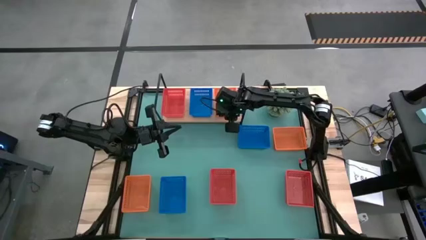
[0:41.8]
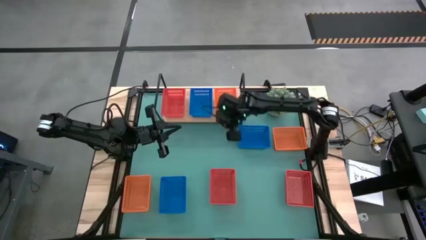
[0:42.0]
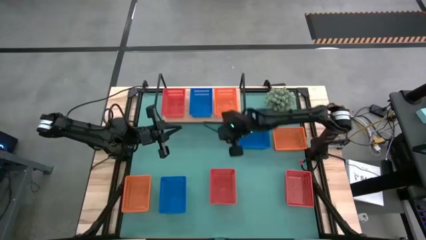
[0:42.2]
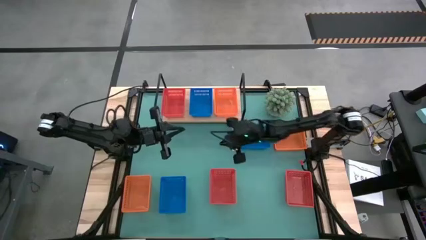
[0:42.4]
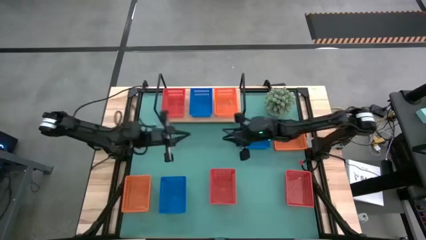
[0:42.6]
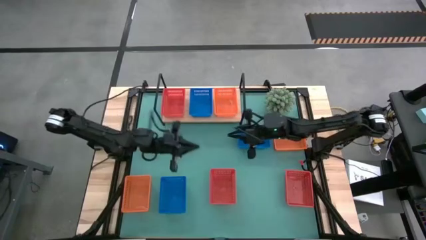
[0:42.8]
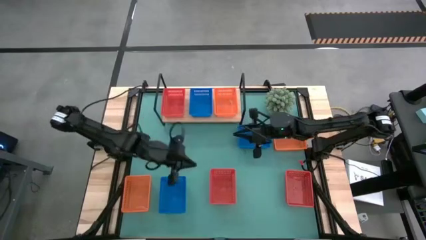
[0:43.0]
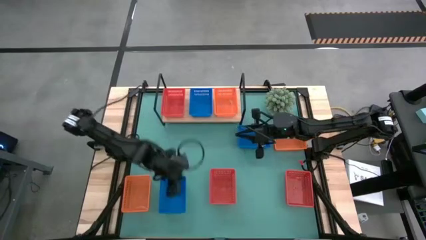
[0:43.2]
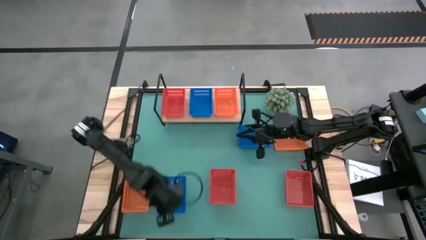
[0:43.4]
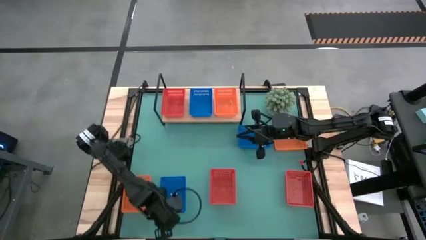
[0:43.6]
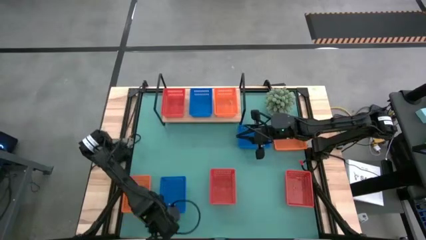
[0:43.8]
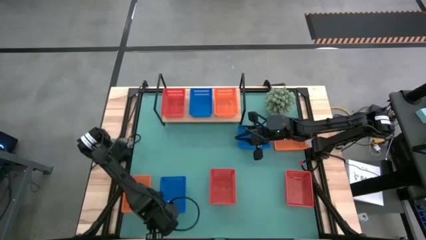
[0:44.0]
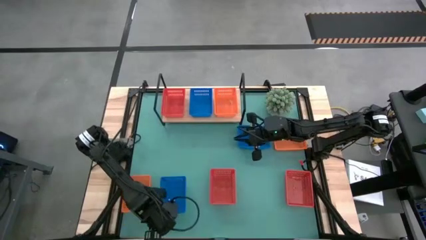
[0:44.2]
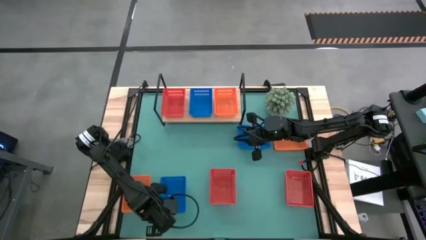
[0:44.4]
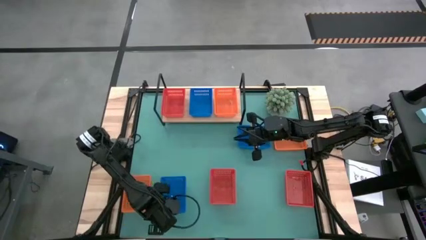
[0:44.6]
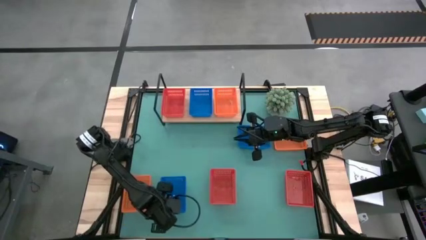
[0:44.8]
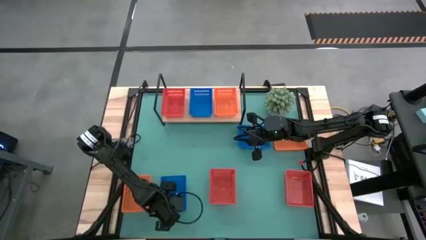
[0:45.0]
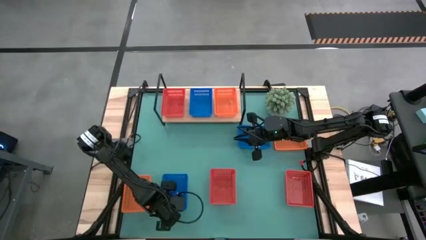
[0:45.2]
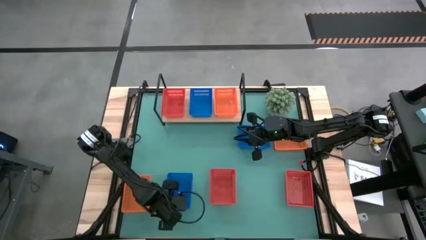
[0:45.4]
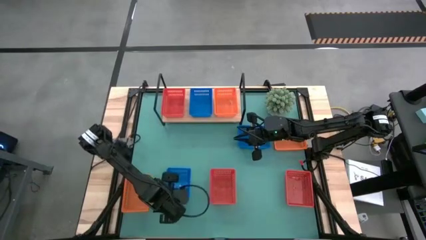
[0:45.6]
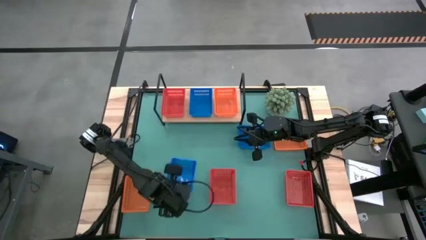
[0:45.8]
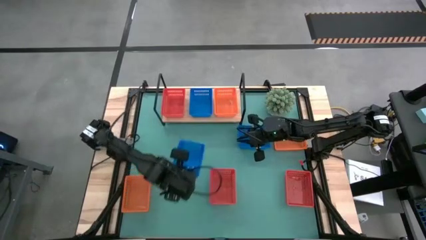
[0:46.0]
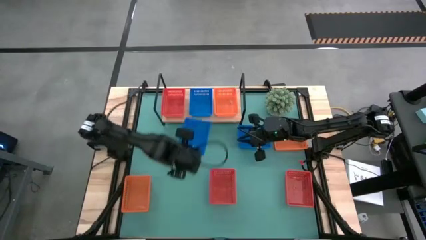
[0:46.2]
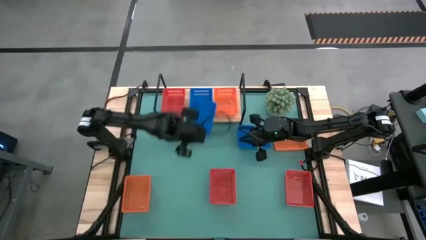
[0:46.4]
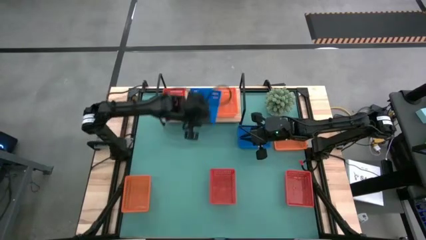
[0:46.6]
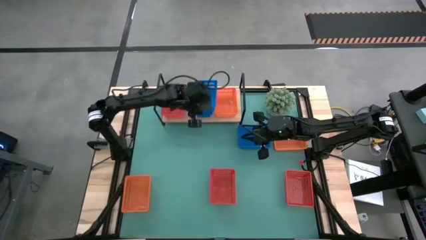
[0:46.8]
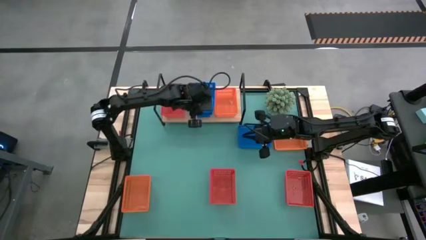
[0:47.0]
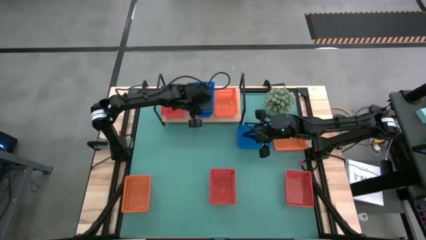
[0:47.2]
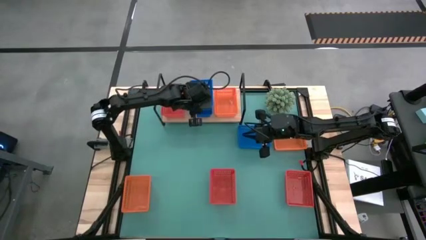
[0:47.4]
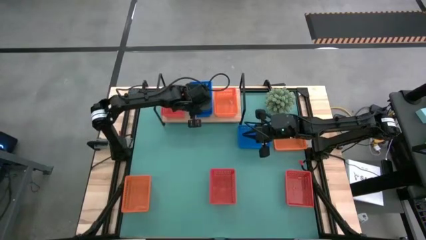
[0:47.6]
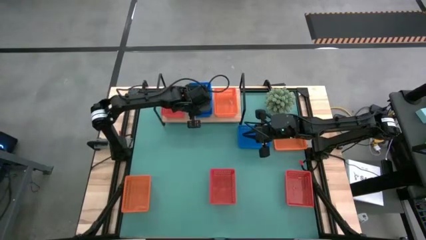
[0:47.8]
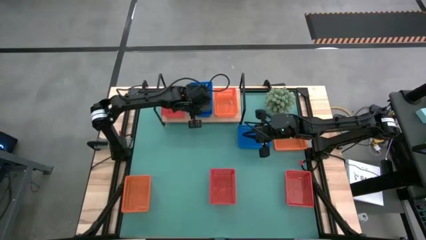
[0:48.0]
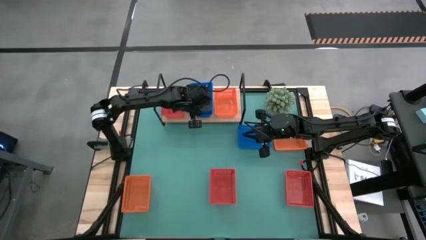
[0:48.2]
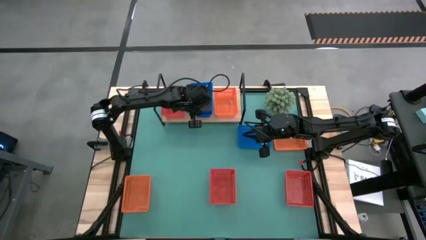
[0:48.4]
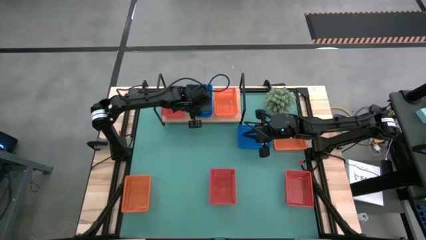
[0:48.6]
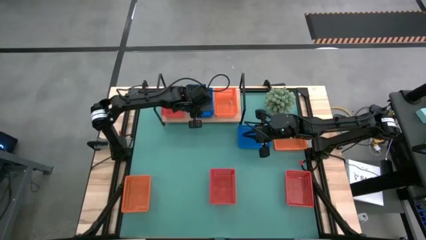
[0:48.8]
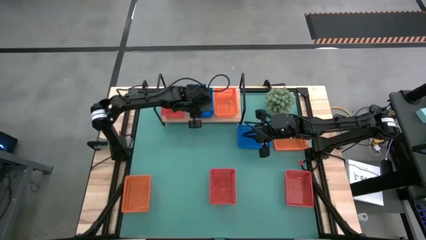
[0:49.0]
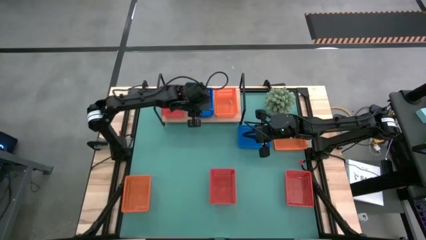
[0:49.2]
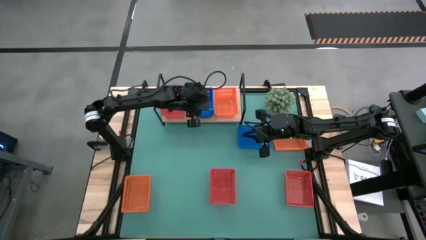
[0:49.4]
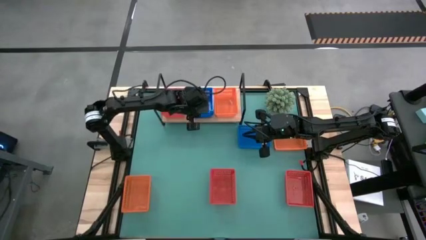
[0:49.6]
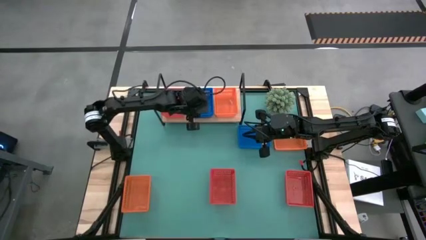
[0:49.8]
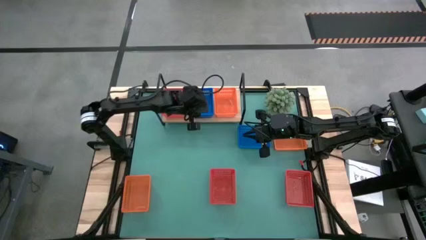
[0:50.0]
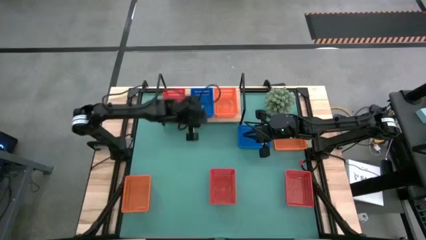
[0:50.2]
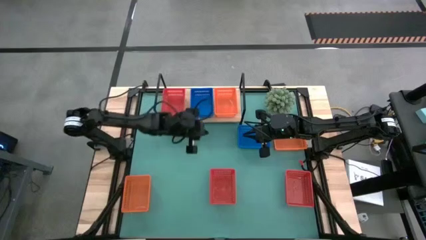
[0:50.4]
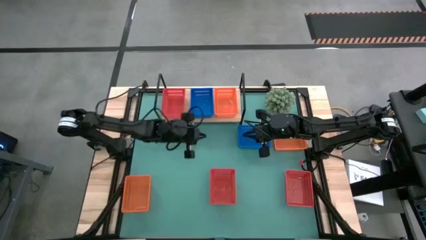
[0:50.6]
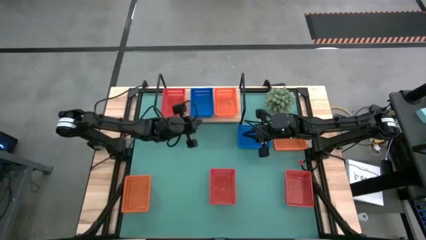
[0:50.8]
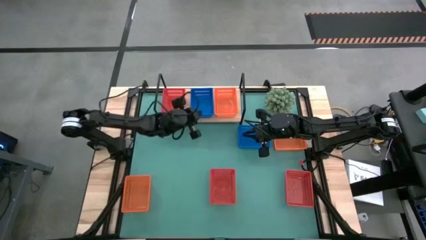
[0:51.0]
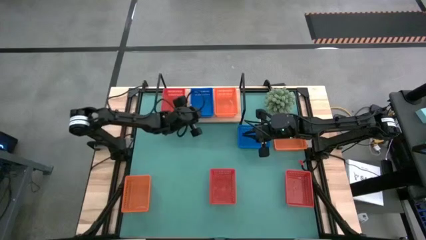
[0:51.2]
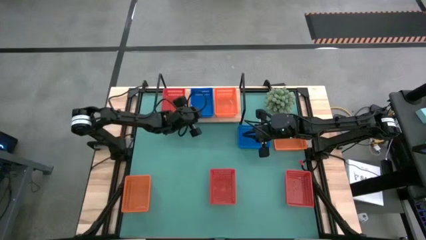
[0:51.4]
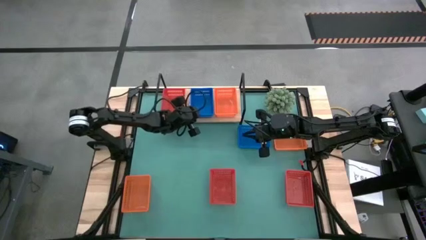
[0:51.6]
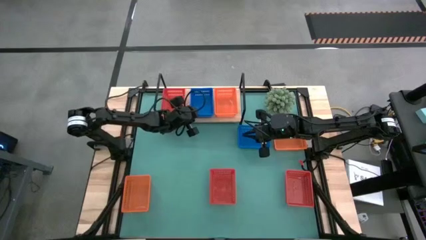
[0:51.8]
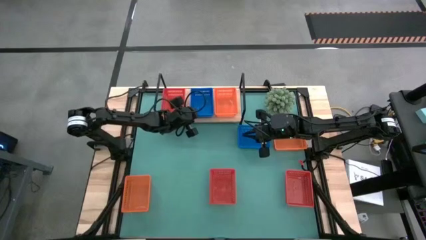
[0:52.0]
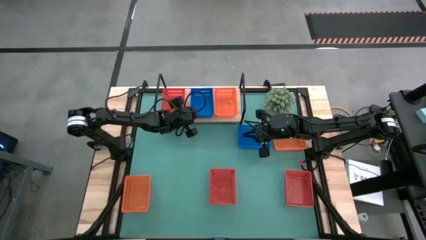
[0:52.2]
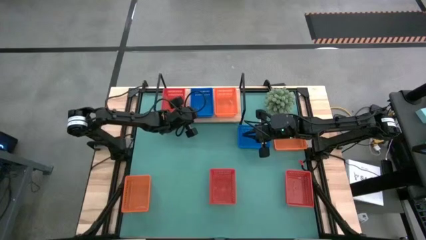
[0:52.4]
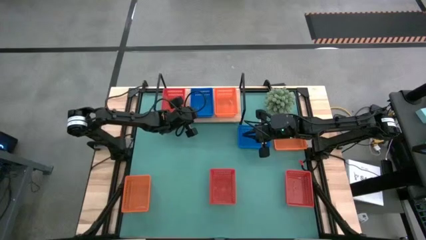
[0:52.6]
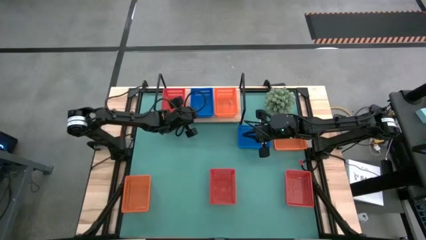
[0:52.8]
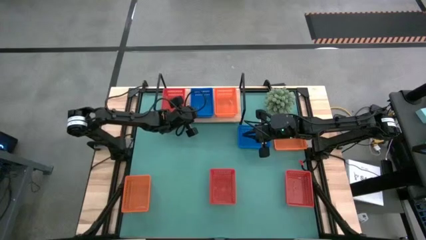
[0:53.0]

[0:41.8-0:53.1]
Task: Stack baskets on shelf by color
Stack the bottom blue bin on top of the blue bin on the shelf

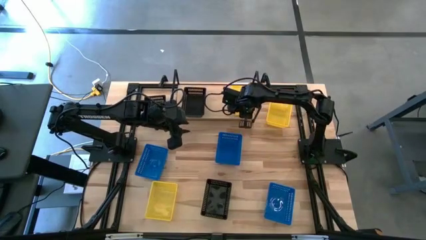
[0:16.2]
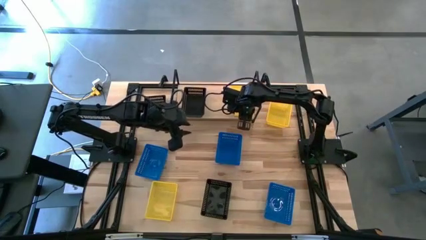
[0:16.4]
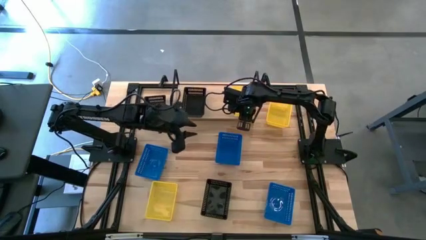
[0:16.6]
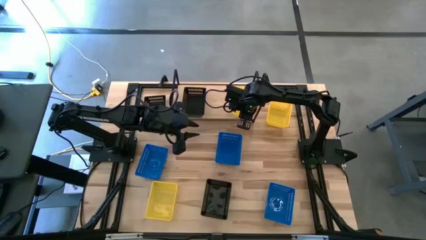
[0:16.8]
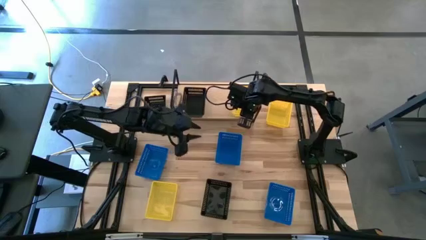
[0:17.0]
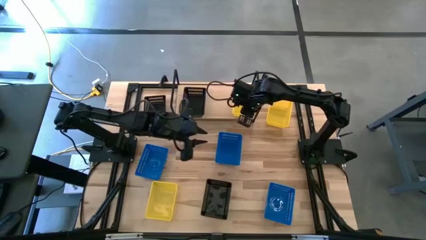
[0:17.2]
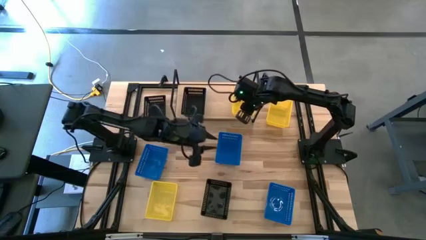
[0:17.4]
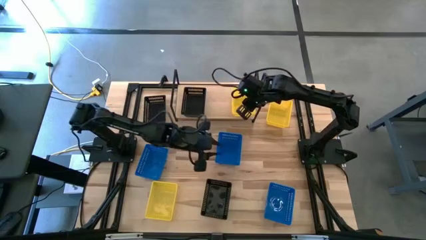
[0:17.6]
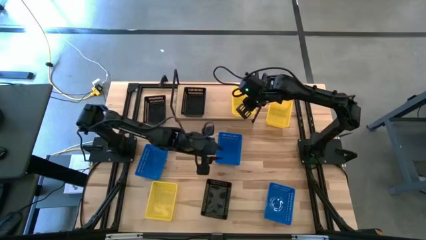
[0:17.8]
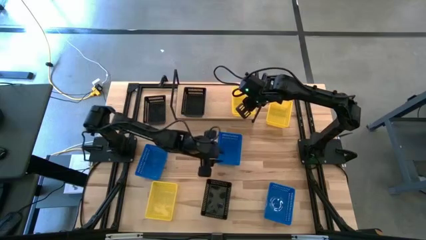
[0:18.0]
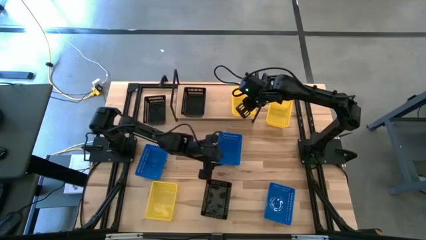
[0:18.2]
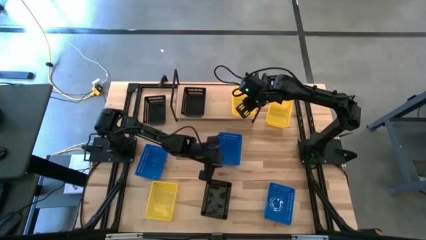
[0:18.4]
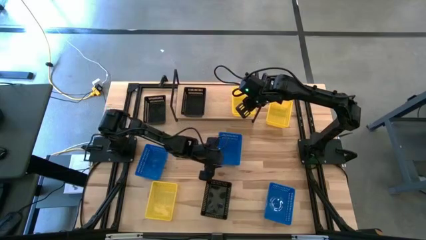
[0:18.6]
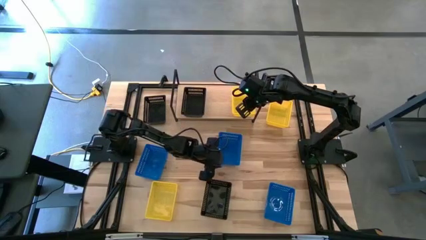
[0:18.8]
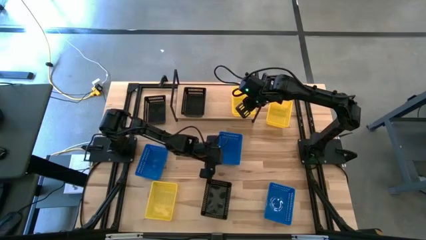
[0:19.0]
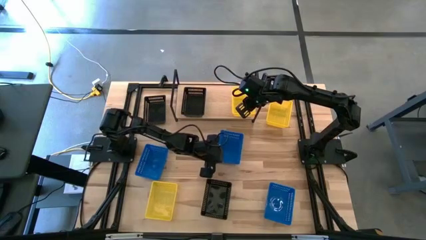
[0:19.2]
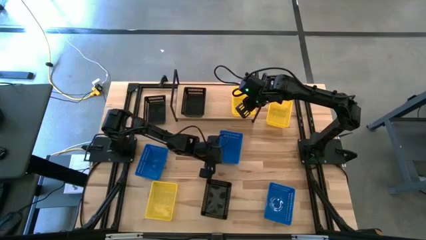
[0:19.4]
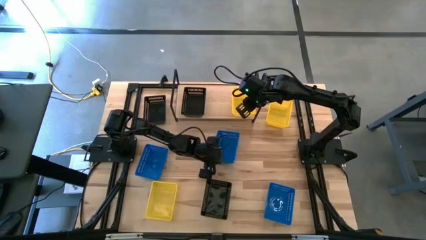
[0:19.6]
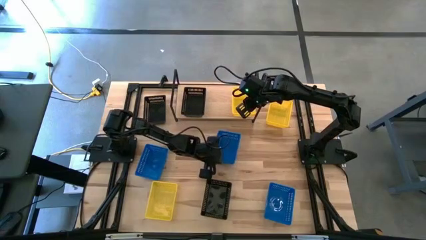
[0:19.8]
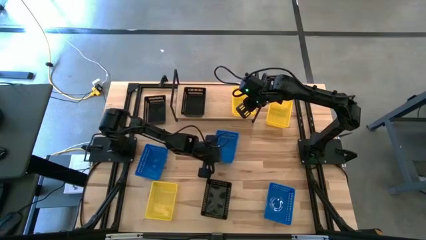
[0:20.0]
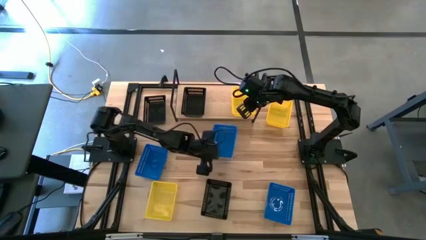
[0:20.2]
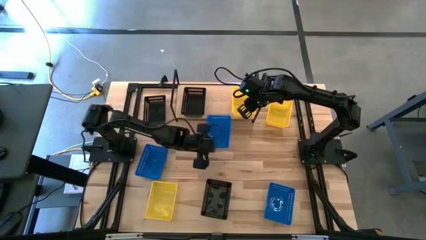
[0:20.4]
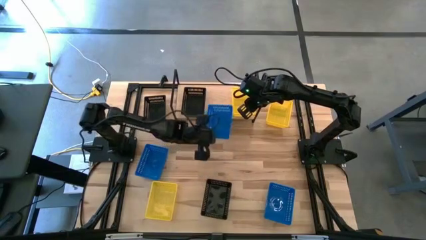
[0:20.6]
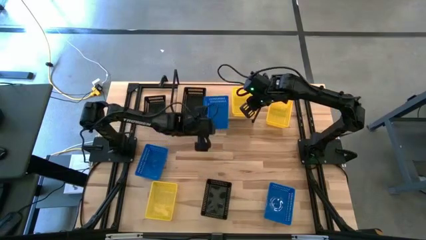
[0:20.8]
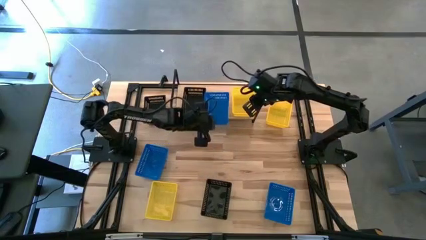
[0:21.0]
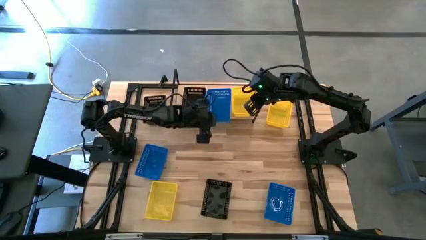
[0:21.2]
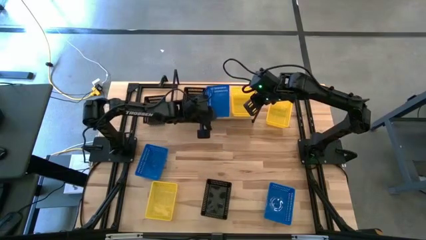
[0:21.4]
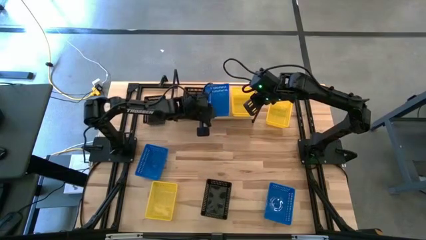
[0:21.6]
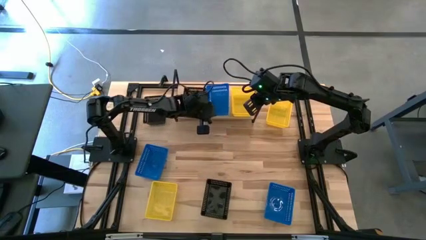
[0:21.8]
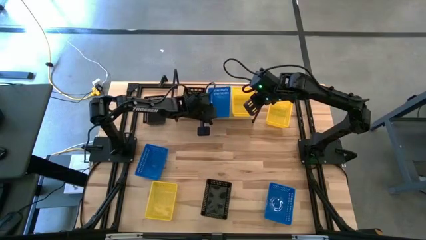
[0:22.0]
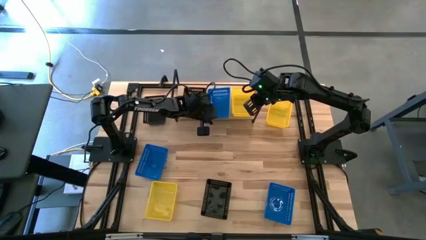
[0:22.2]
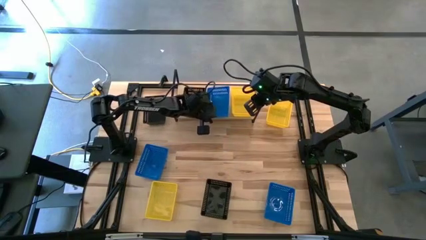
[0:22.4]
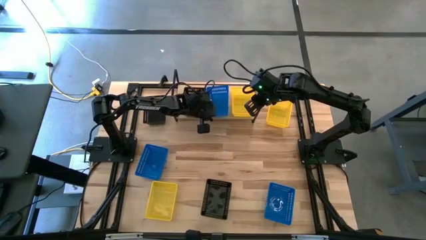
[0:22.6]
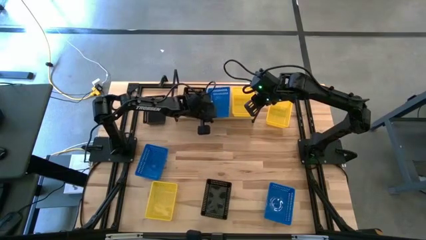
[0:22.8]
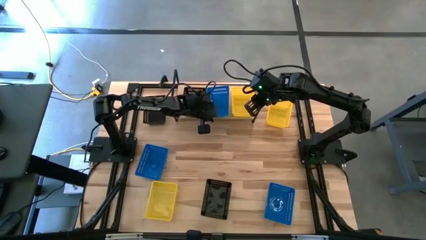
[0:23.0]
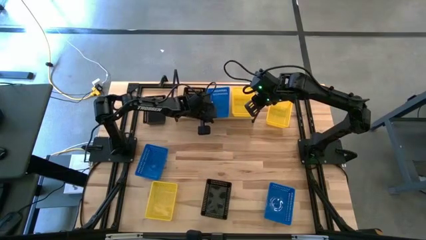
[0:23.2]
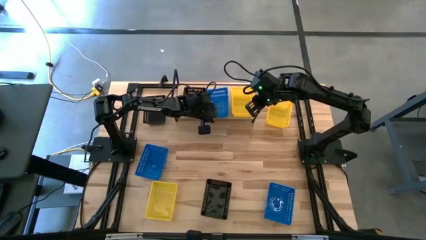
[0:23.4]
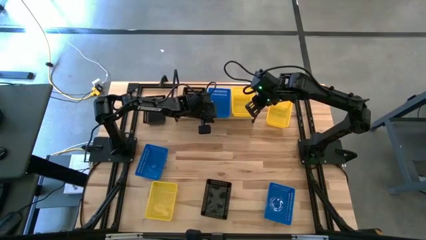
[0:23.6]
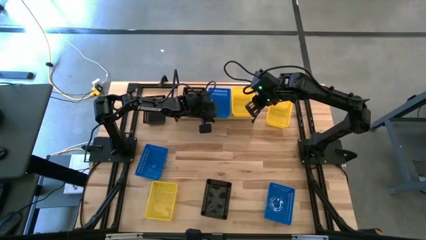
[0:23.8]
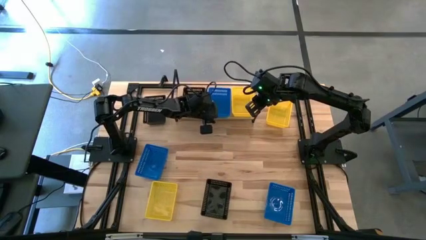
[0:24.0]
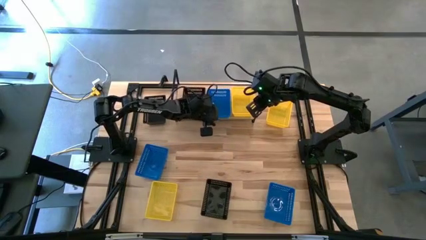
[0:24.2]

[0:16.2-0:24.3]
Task: Stack baskets on shelf by color
Put the center blue bin on the shelf
